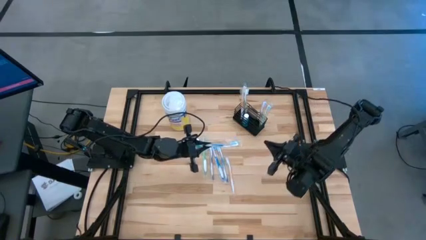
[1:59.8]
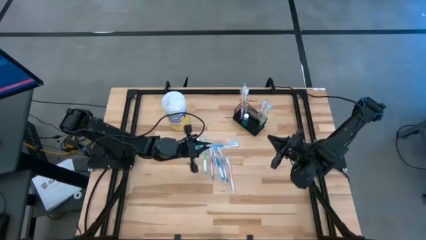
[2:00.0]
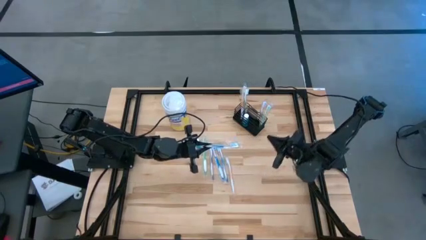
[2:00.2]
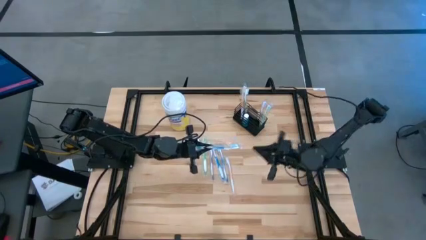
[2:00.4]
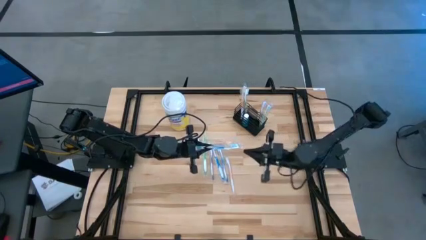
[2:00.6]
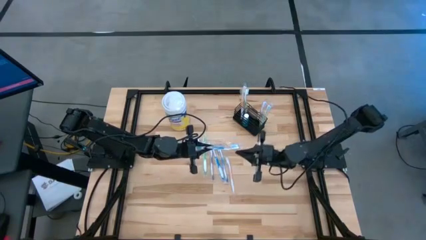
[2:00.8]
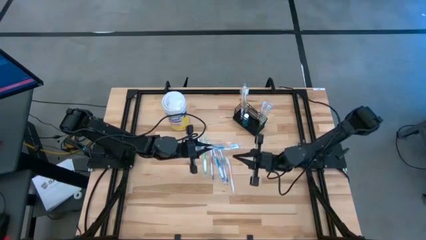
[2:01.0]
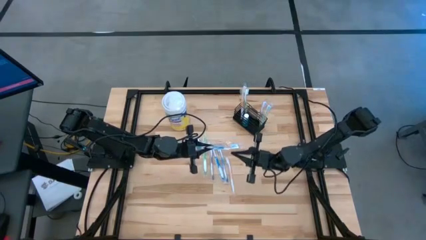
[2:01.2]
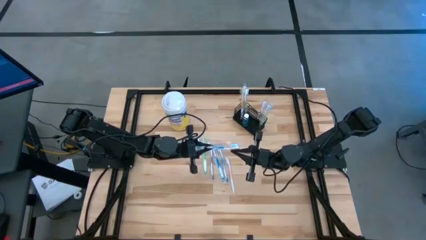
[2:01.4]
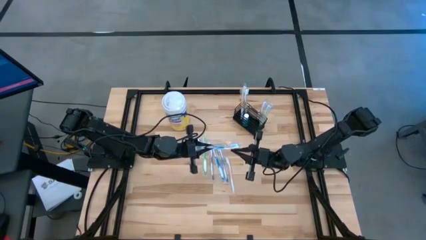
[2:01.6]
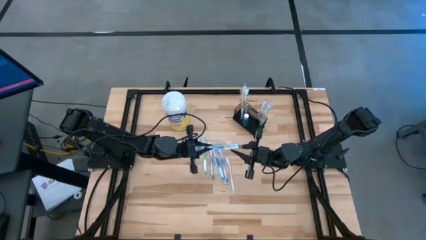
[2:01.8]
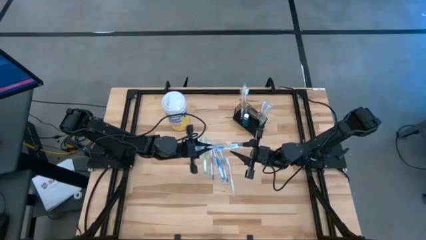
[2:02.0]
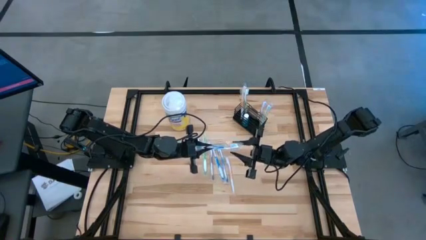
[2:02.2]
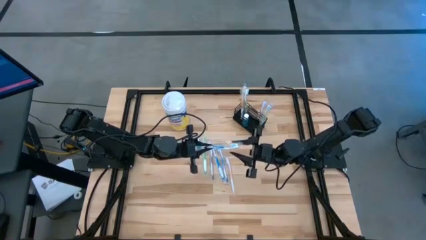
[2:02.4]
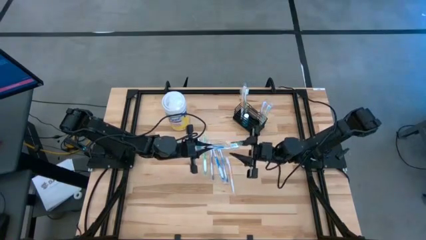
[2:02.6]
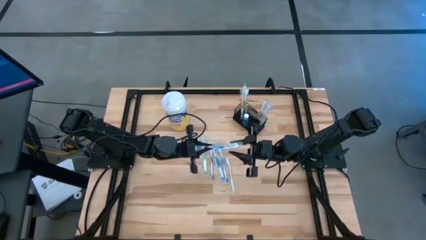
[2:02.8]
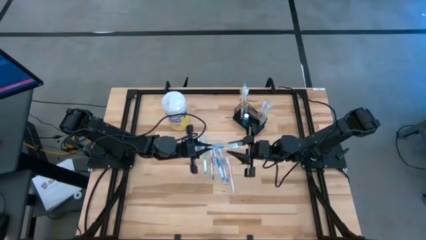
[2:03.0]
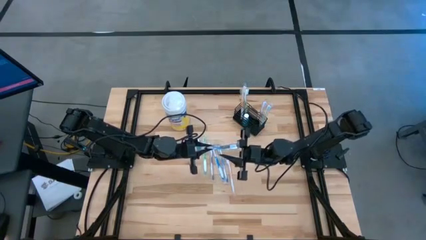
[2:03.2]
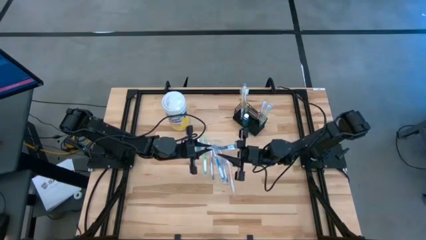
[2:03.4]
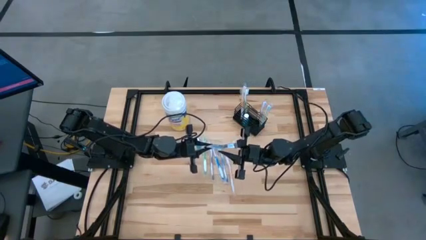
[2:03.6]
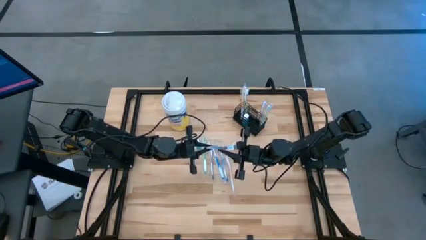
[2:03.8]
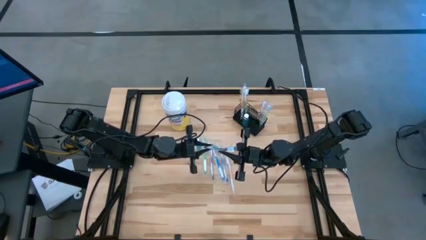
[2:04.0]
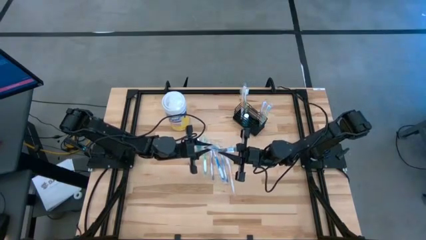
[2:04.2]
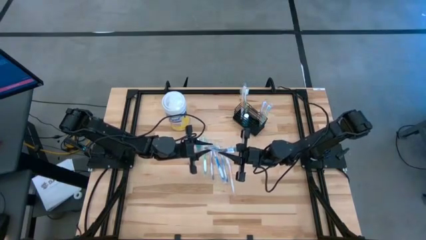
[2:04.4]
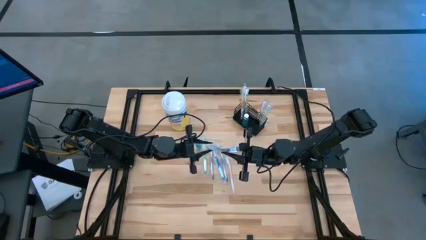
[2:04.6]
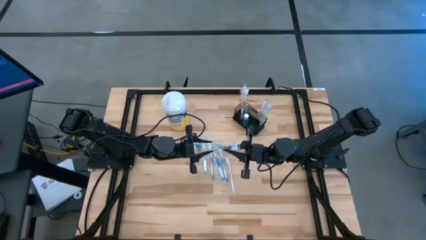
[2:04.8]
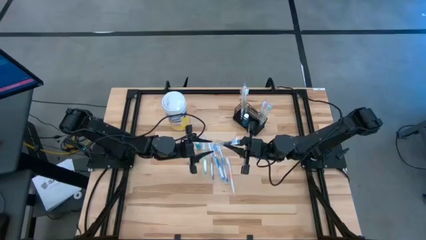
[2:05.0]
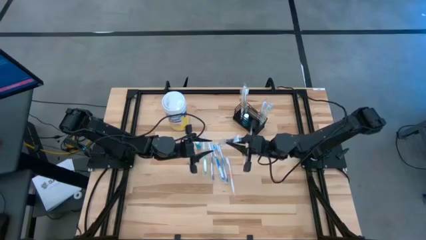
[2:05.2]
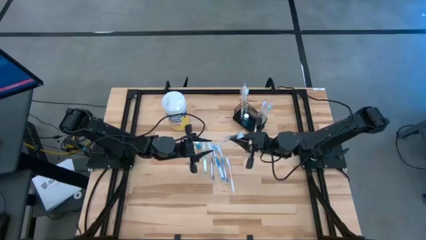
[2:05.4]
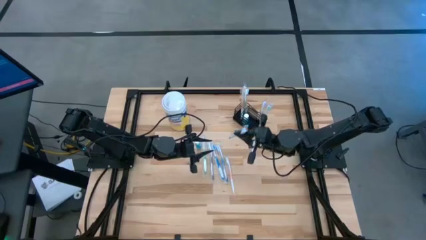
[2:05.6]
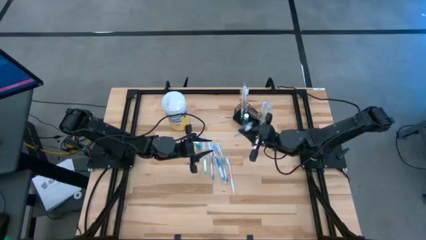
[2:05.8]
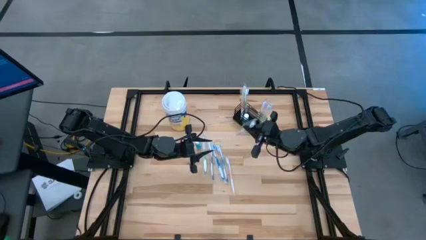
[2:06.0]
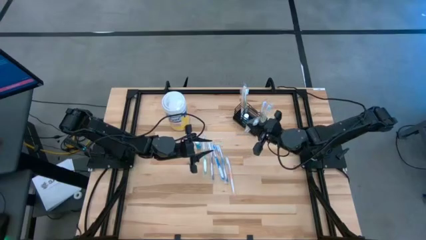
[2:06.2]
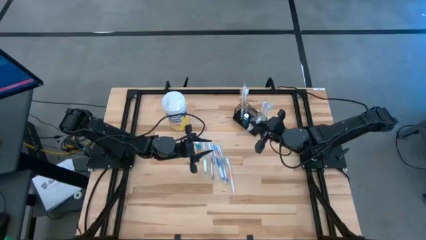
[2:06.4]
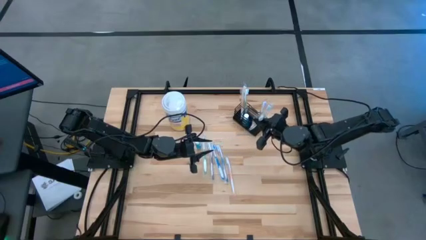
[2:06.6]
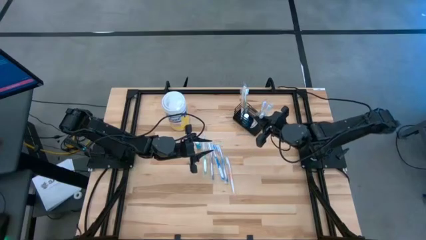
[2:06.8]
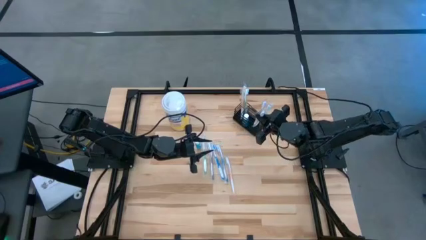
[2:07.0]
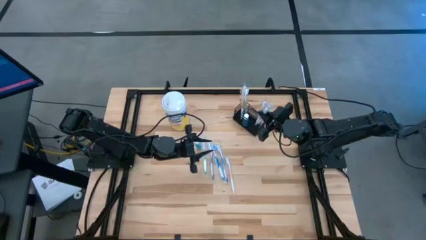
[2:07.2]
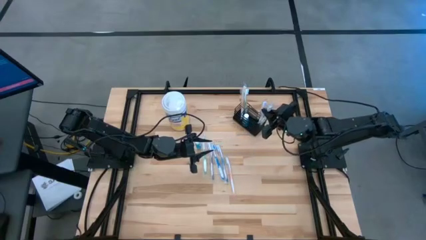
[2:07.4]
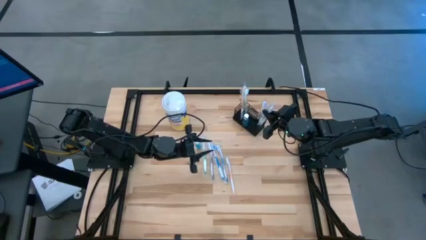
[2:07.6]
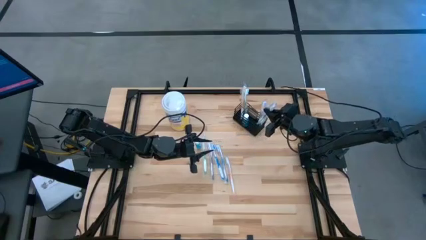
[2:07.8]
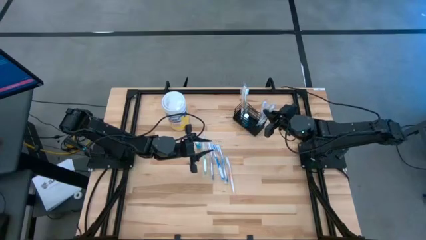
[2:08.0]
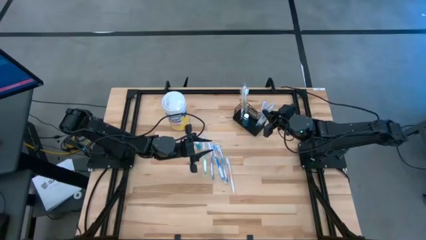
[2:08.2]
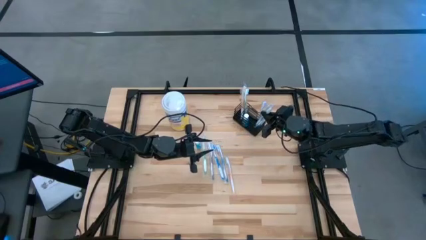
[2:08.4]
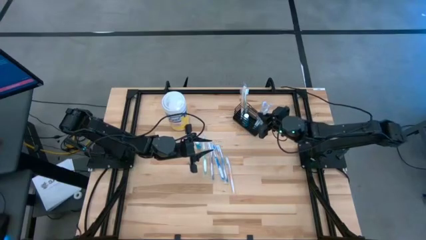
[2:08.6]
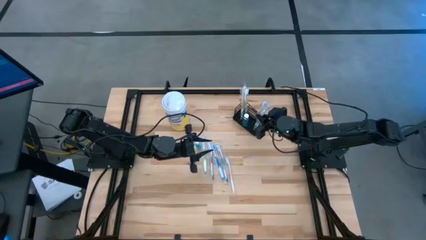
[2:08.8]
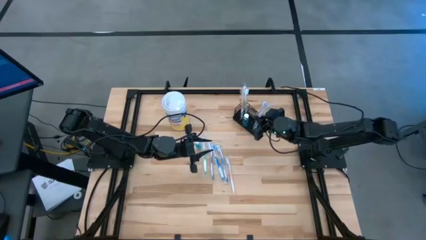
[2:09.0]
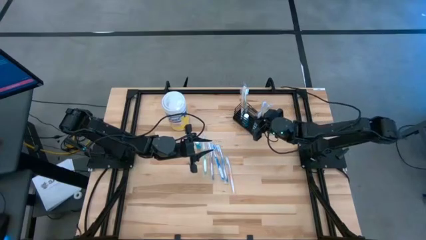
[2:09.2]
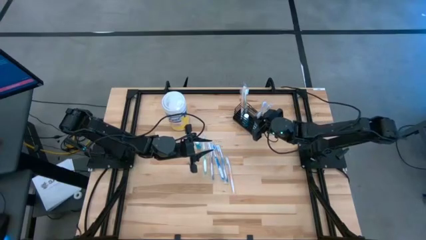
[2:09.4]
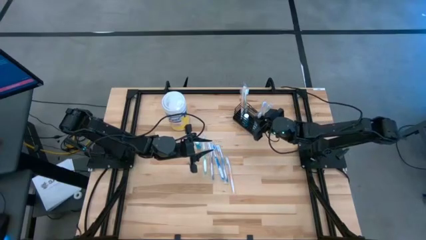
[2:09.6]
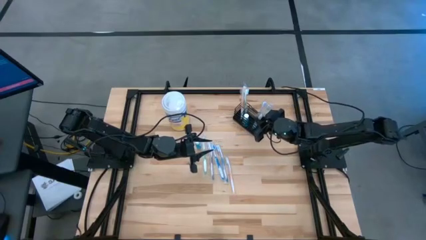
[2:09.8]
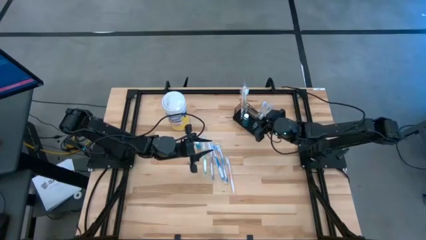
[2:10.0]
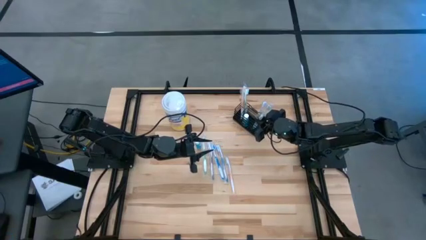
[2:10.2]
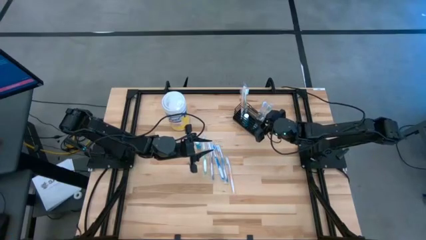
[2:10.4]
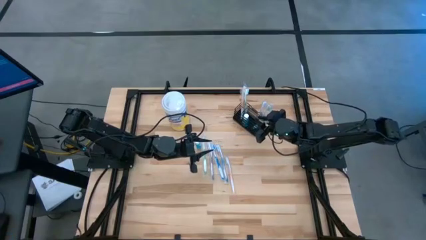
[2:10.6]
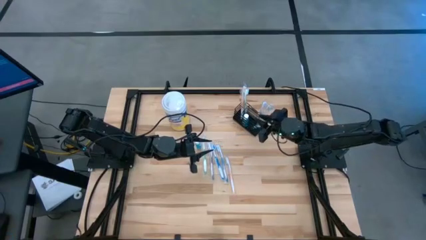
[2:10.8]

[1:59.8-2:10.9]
Task: Pick & Place toothbrushing station
Put the right blue toothbrush into the black wire organizer

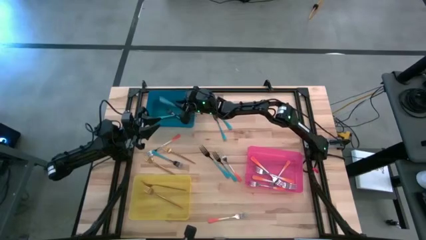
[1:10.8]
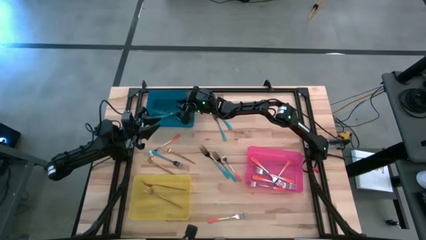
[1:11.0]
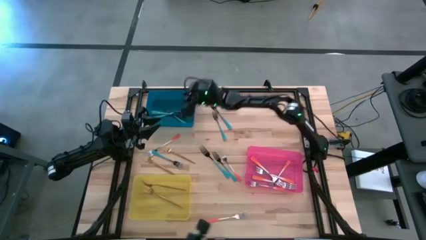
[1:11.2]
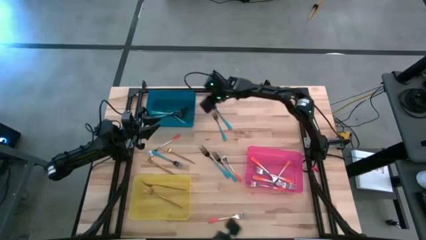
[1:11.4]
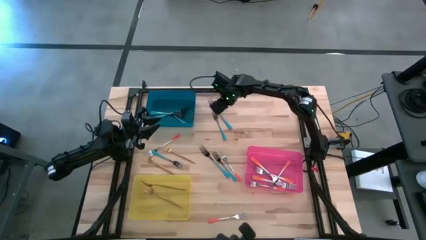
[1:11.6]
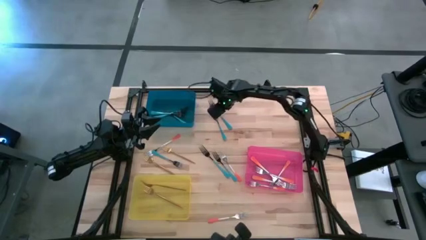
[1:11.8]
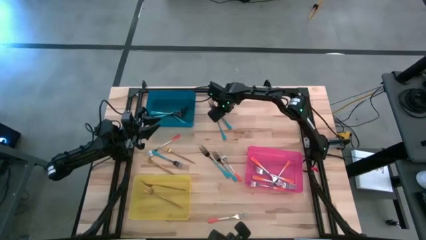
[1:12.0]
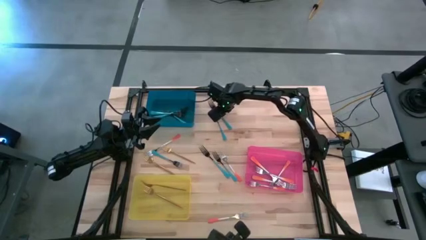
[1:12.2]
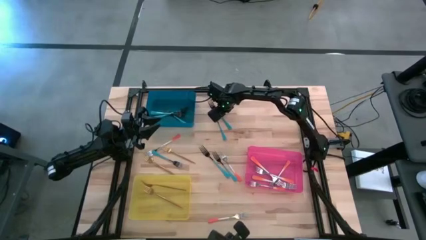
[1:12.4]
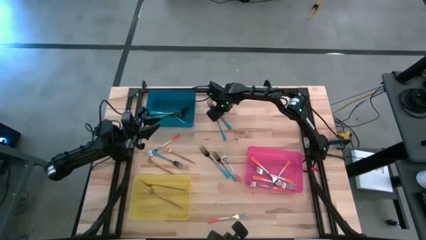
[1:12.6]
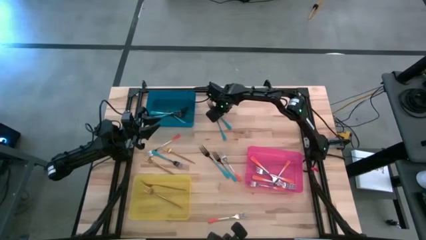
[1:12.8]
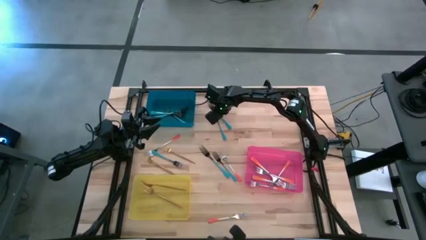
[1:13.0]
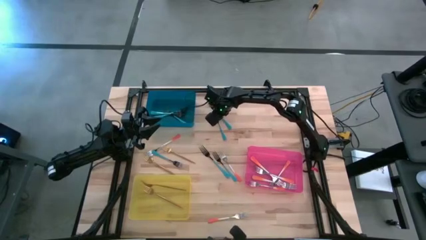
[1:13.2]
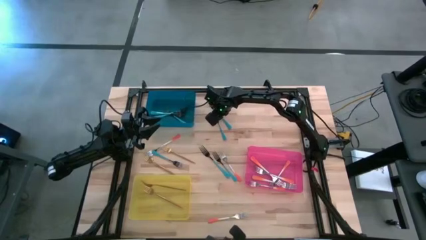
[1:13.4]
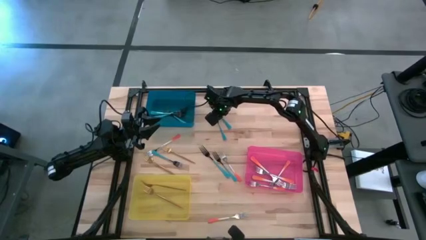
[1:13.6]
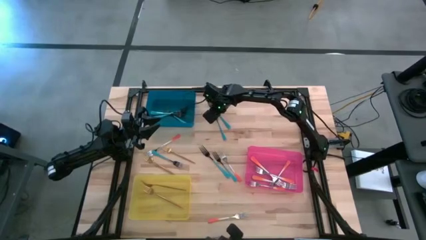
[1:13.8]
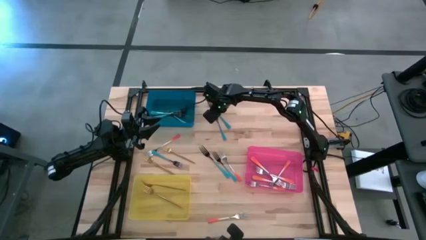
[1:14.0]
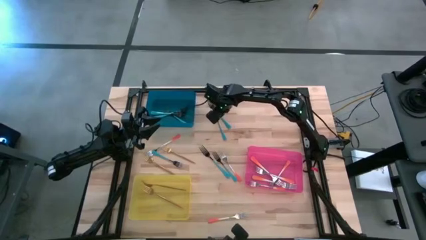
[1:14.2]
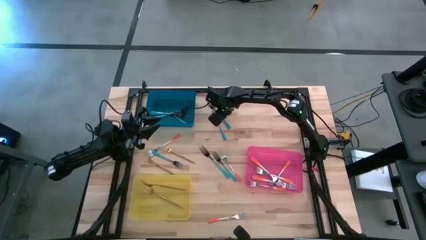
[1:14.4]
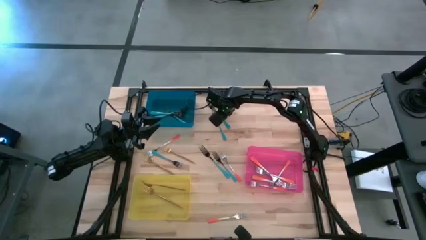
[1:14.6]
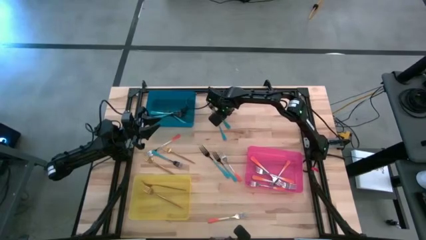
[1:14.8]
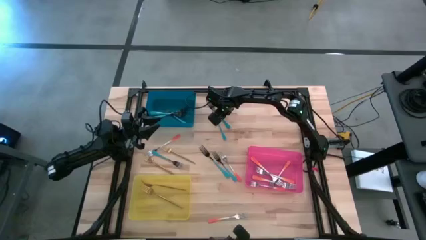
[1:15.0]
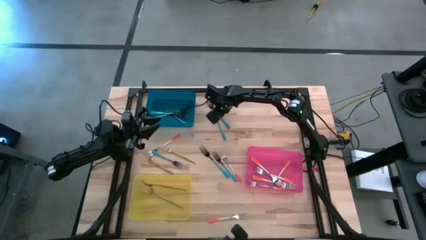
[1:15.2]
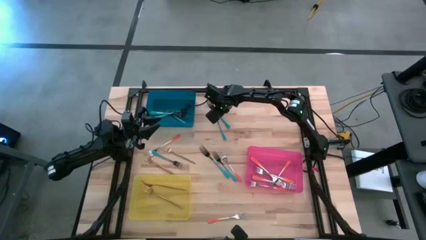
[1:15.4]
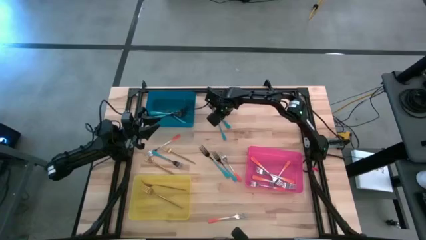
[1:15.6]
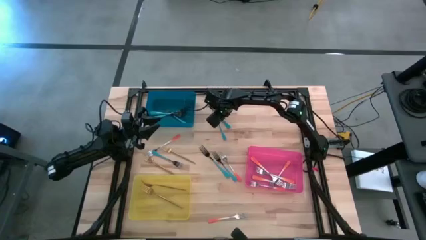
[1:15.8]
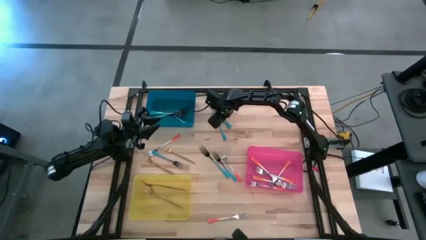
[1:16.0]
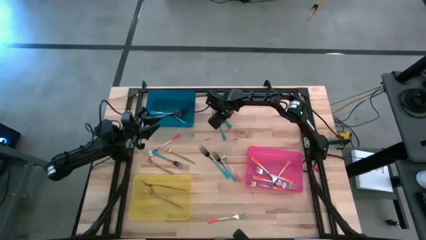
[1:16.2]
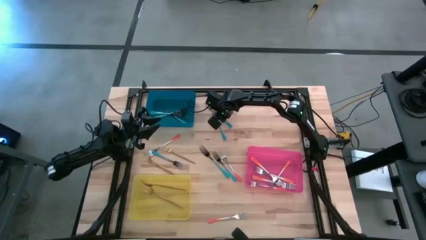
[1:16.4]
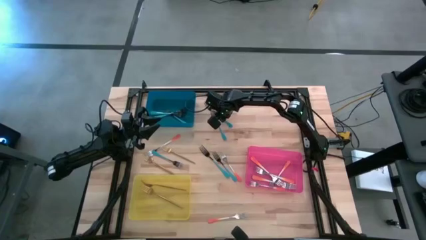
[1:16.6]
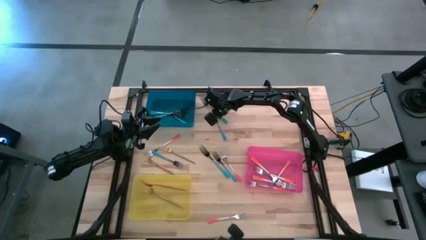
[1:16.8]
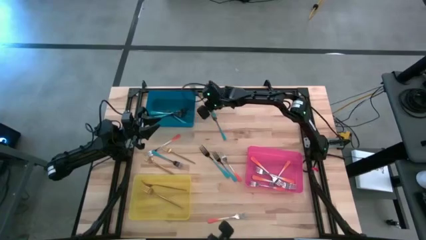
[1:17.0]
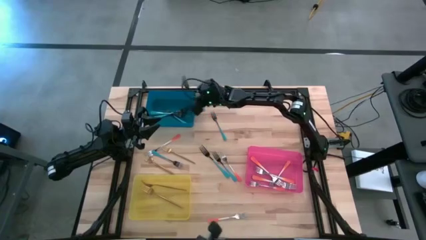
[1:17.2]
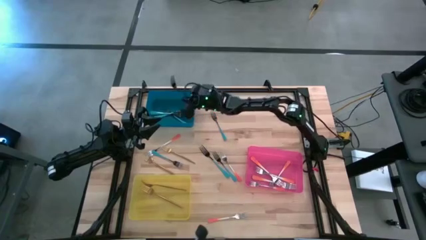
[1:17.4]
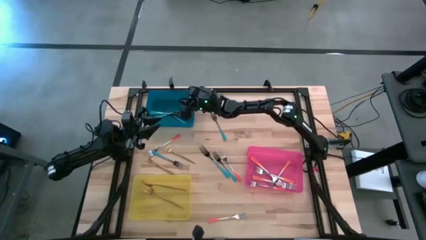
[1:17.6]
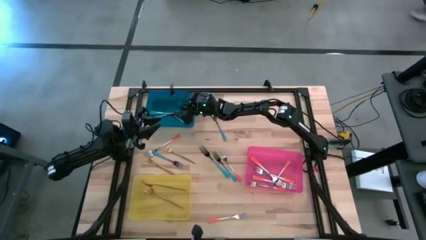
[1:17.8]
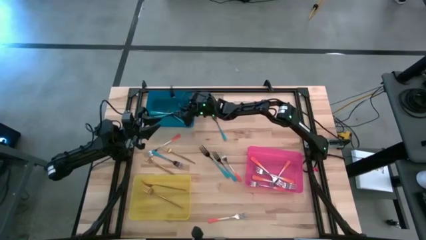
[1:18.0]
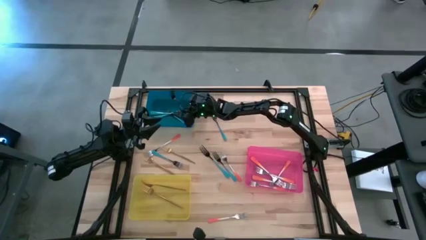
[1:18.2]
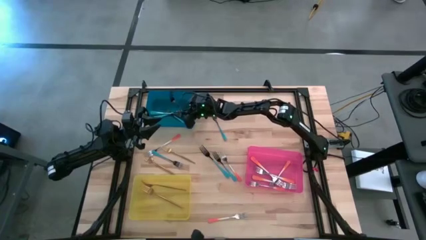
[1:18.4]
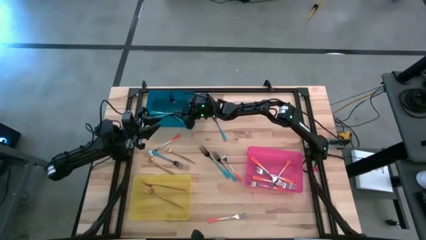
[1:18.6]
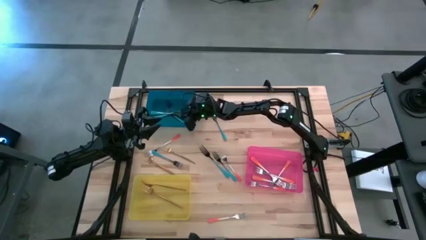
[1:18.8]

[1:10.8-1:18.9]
Task: Sort silverware by color (type)
Put the blue fork into the blue bin
